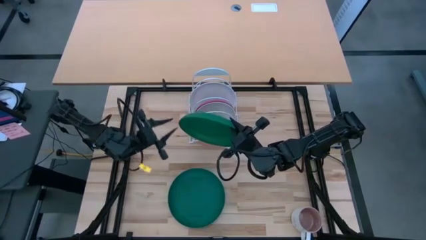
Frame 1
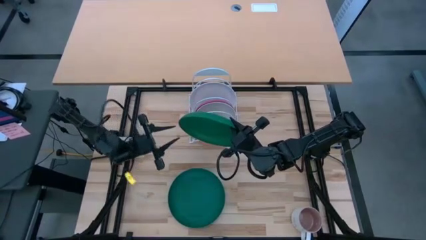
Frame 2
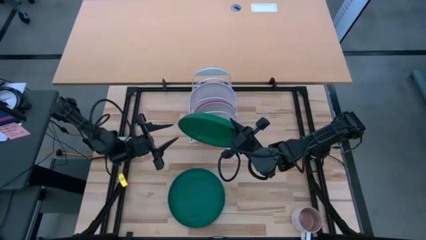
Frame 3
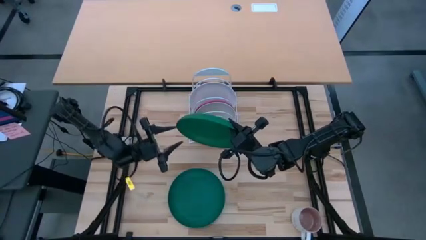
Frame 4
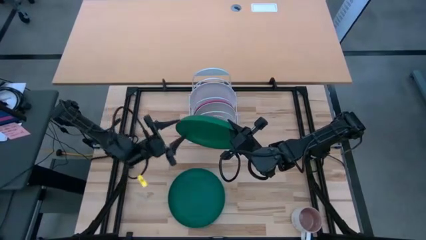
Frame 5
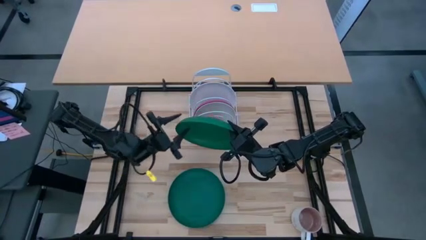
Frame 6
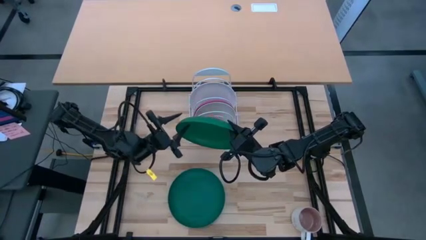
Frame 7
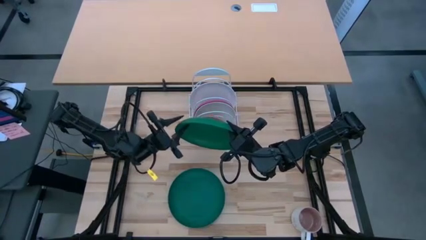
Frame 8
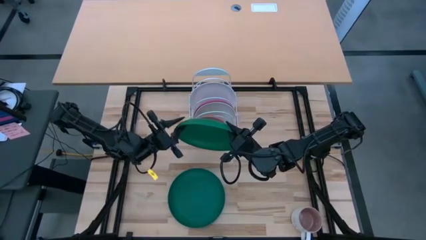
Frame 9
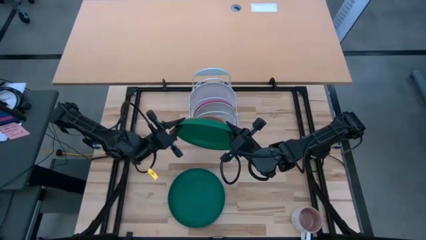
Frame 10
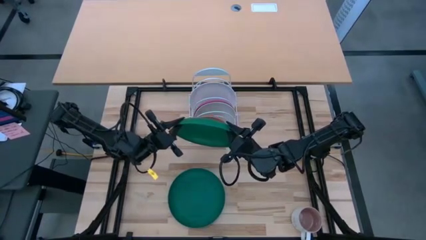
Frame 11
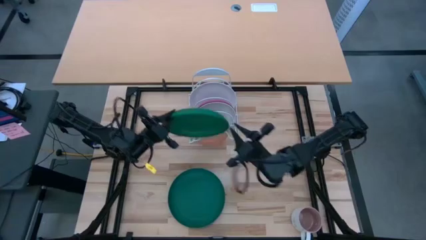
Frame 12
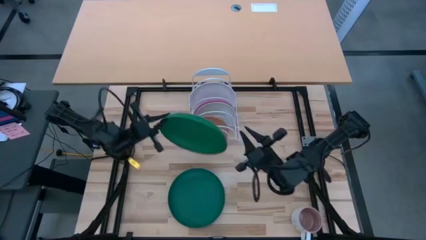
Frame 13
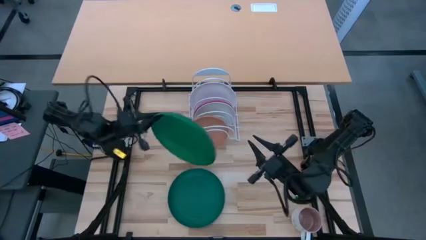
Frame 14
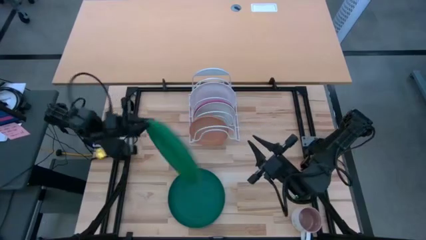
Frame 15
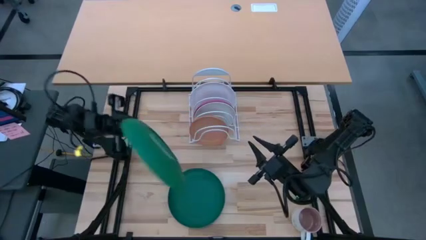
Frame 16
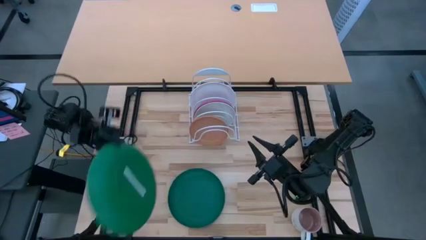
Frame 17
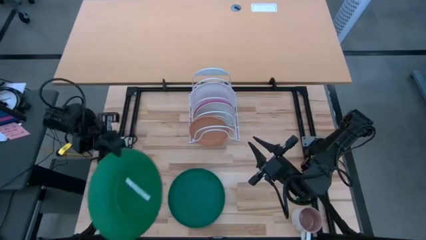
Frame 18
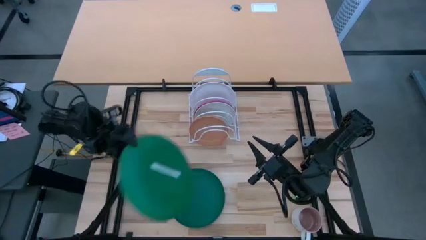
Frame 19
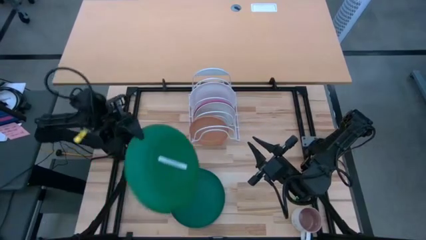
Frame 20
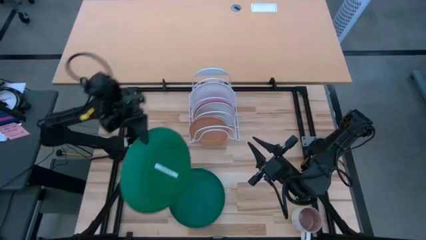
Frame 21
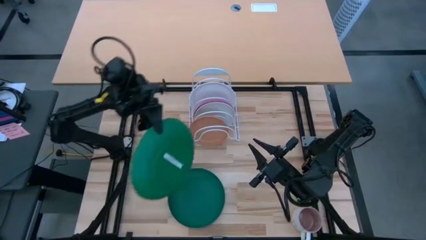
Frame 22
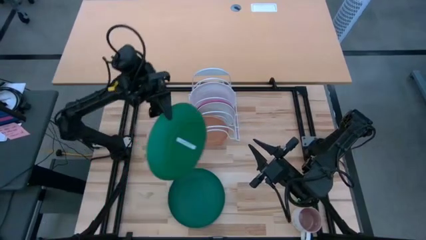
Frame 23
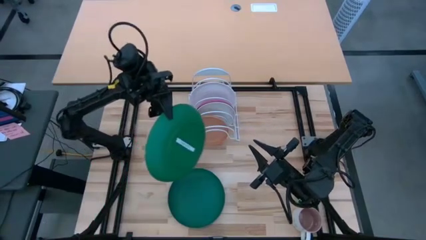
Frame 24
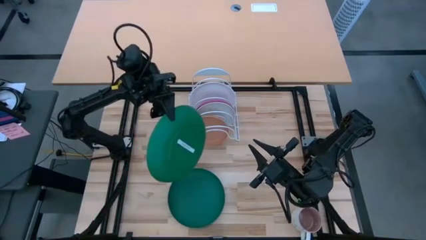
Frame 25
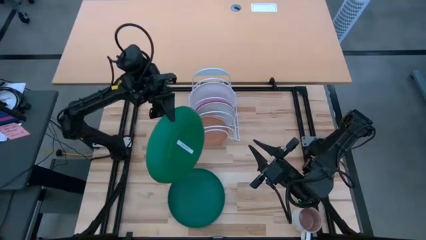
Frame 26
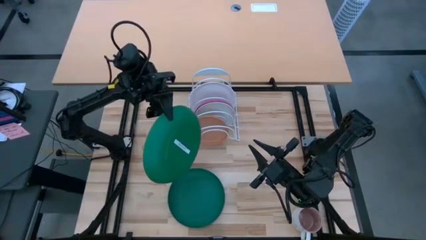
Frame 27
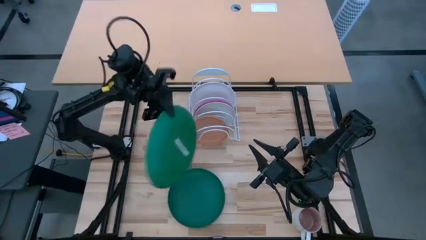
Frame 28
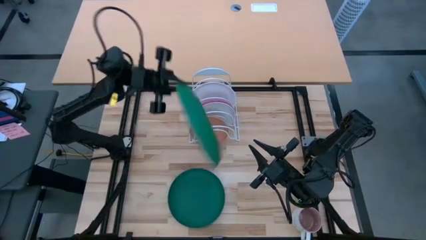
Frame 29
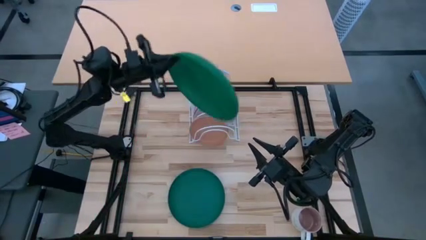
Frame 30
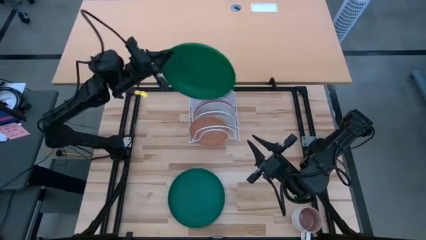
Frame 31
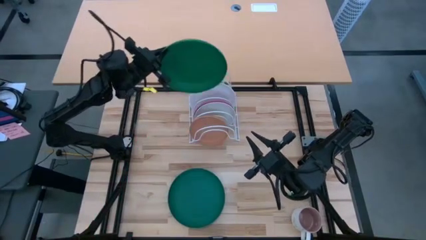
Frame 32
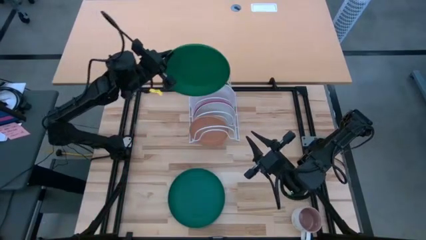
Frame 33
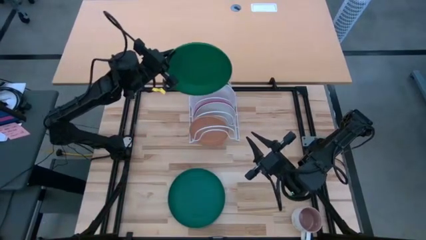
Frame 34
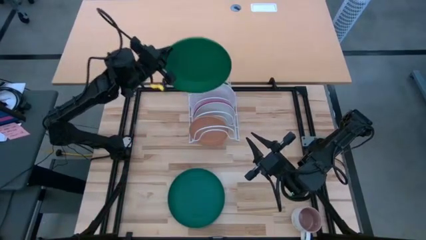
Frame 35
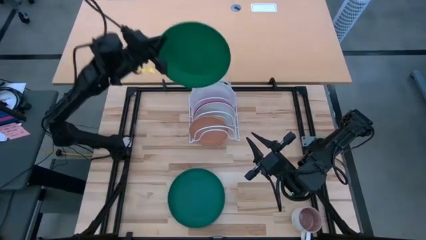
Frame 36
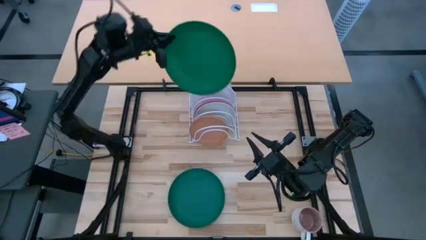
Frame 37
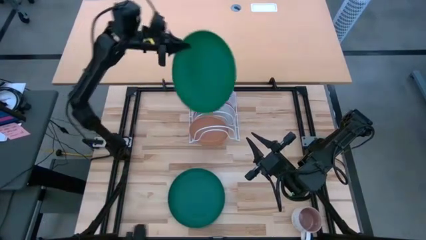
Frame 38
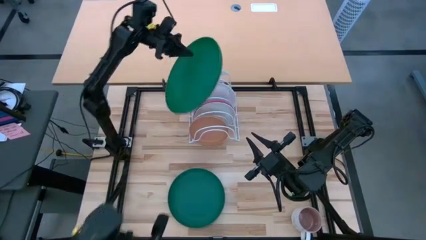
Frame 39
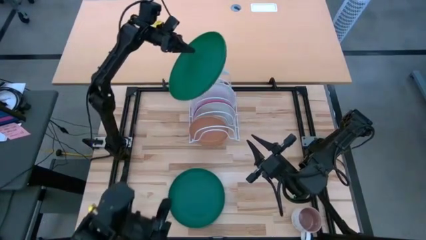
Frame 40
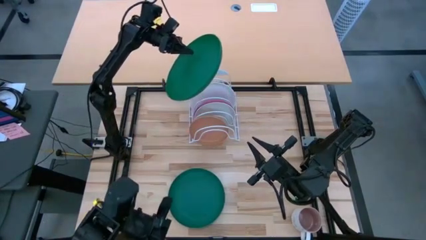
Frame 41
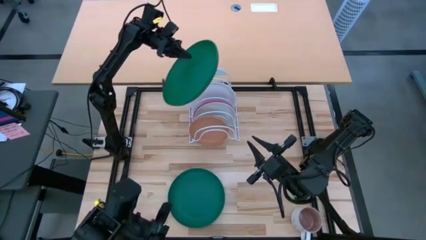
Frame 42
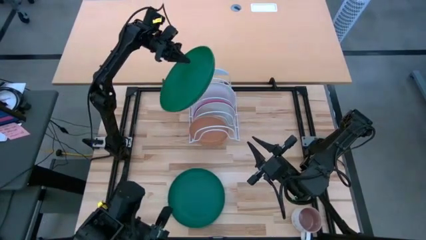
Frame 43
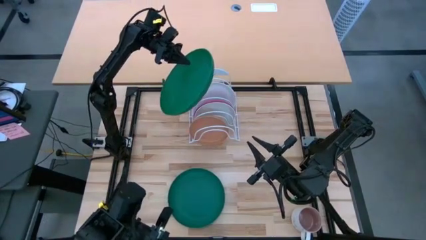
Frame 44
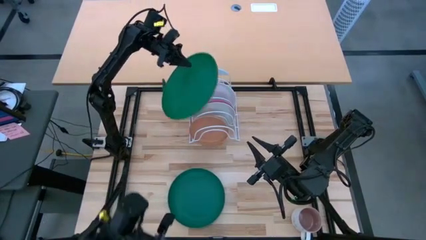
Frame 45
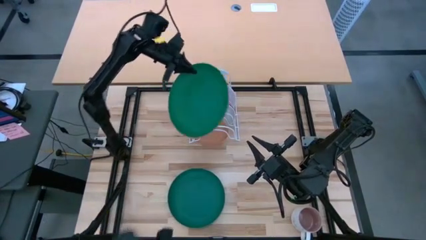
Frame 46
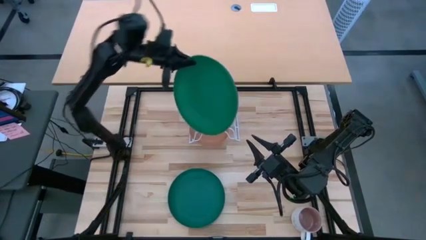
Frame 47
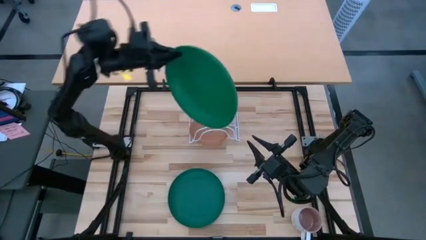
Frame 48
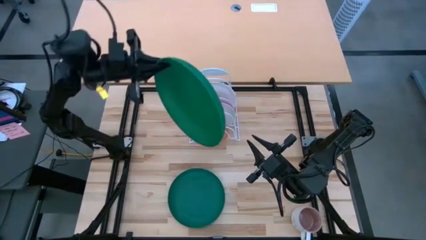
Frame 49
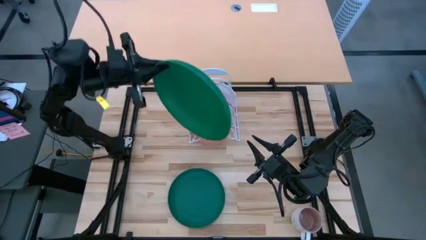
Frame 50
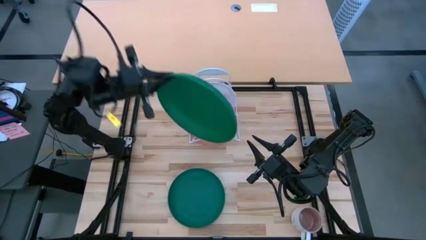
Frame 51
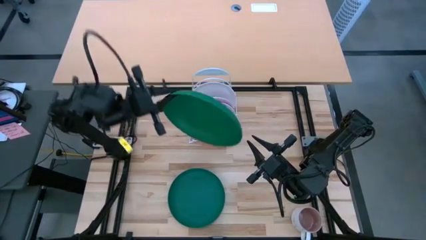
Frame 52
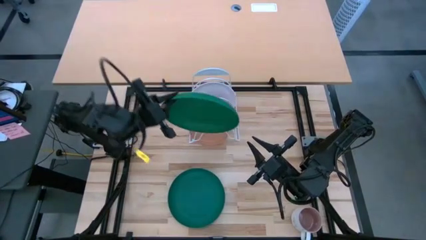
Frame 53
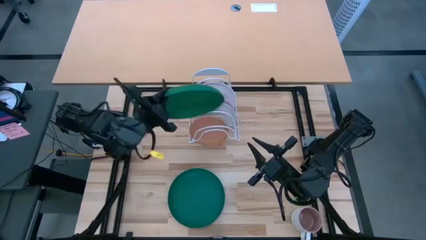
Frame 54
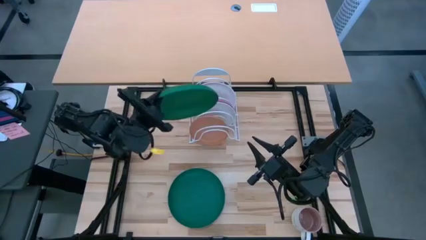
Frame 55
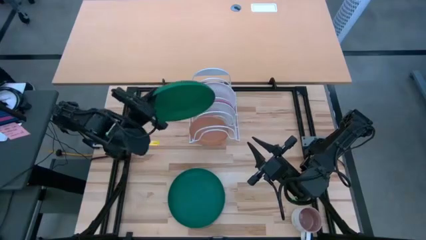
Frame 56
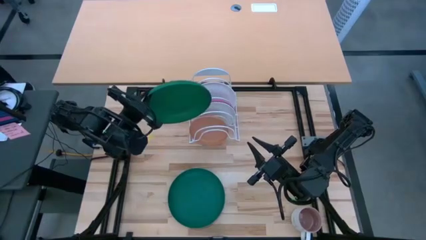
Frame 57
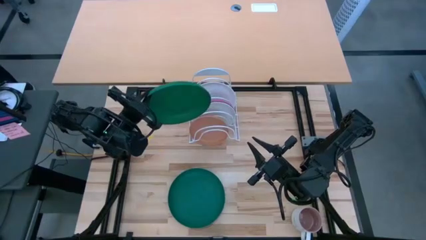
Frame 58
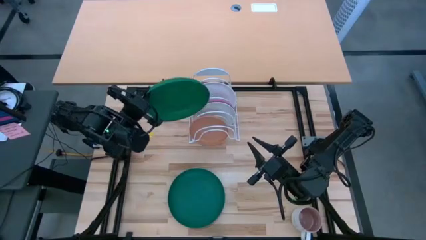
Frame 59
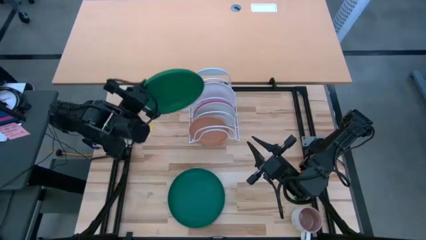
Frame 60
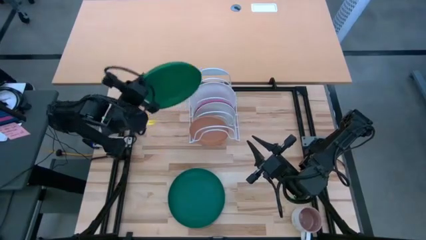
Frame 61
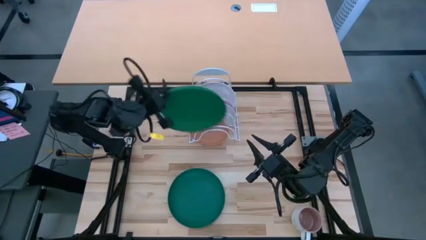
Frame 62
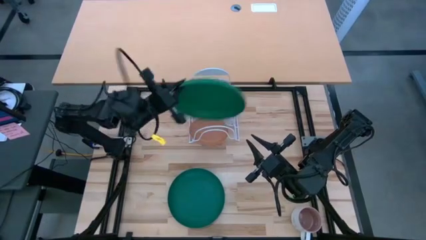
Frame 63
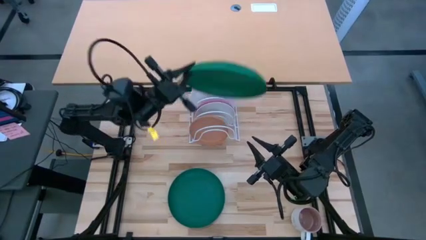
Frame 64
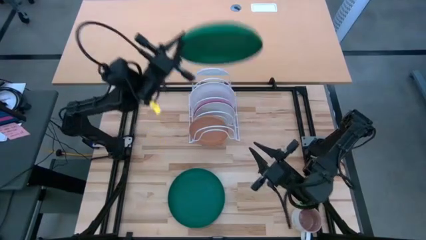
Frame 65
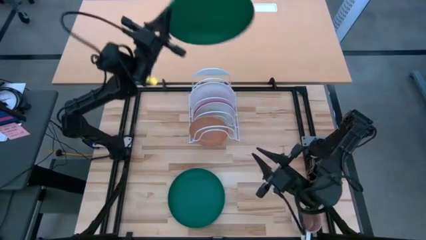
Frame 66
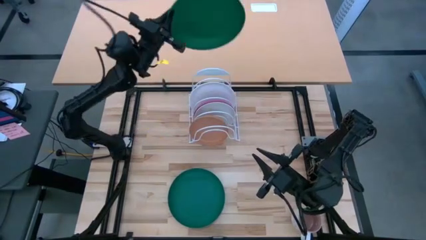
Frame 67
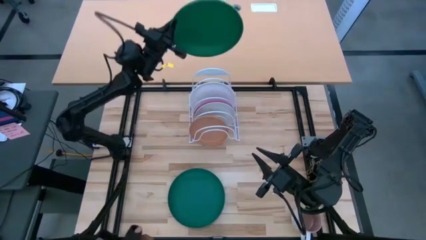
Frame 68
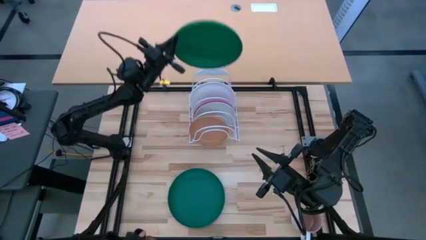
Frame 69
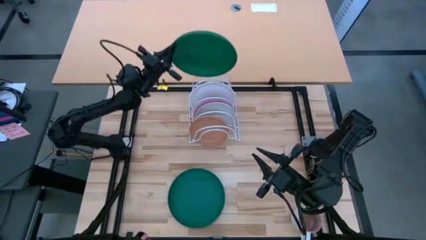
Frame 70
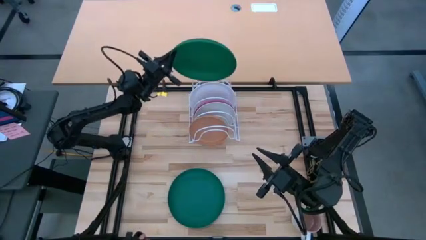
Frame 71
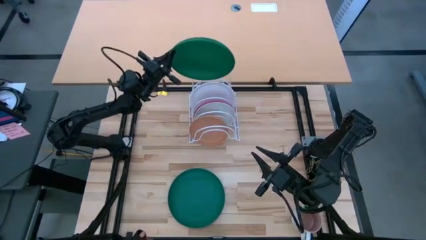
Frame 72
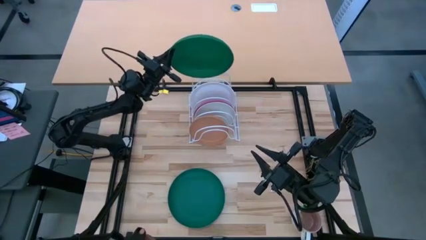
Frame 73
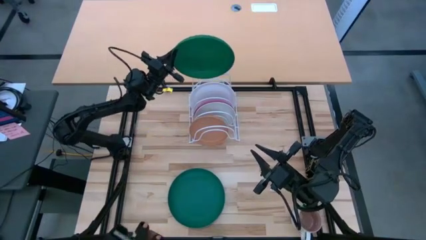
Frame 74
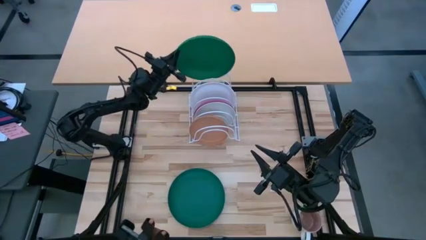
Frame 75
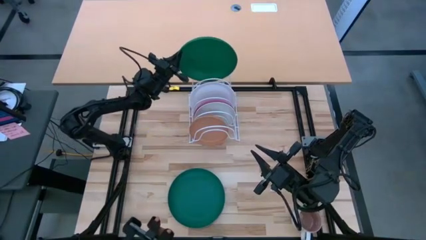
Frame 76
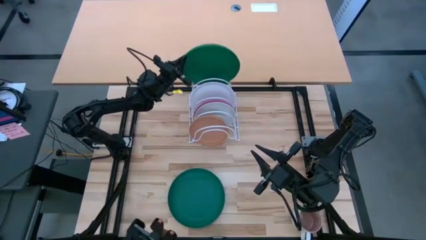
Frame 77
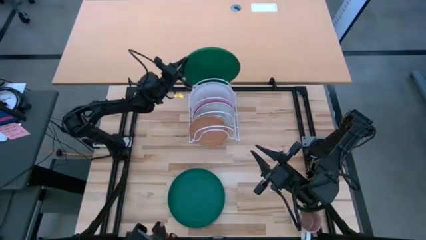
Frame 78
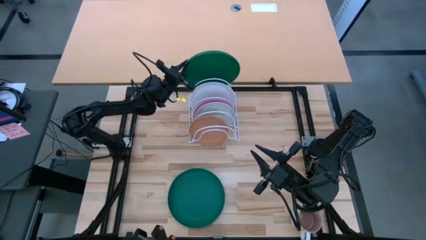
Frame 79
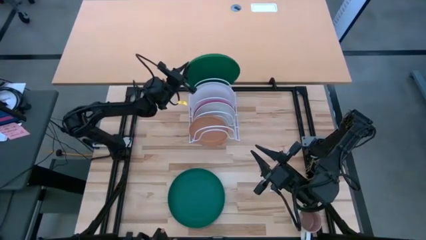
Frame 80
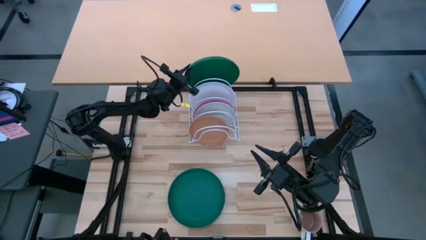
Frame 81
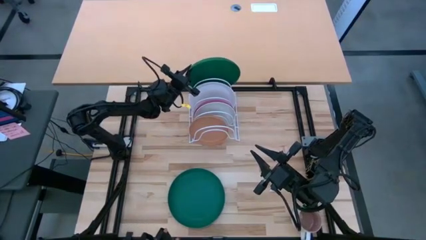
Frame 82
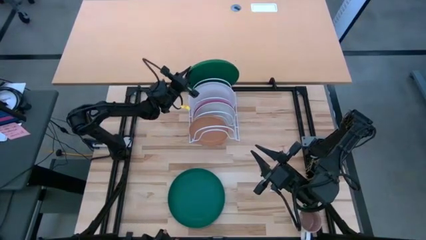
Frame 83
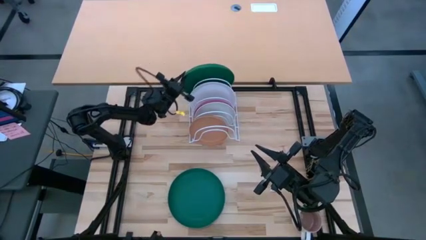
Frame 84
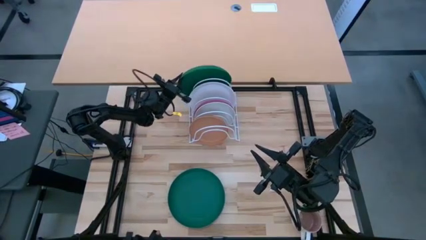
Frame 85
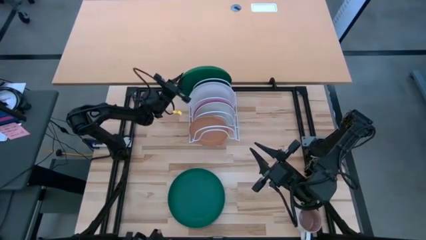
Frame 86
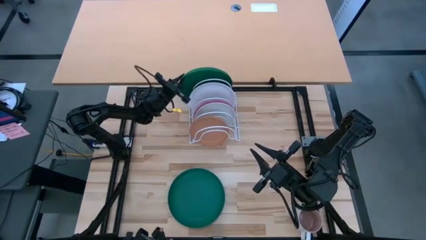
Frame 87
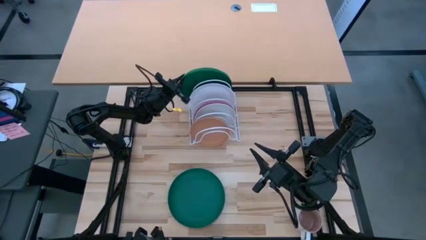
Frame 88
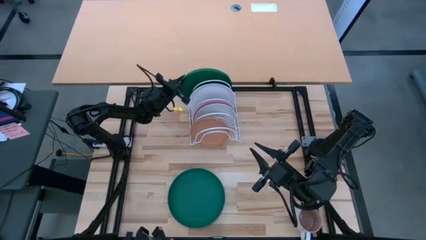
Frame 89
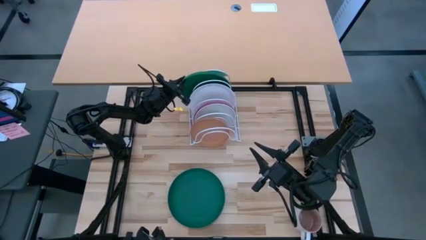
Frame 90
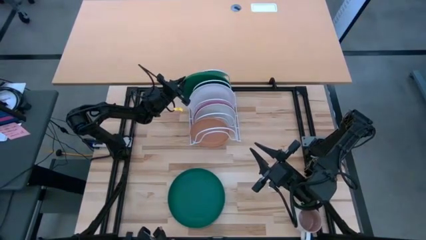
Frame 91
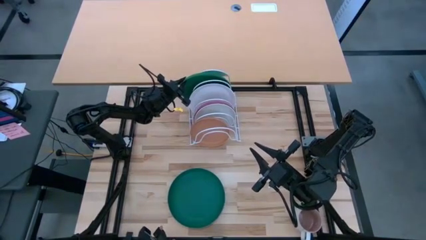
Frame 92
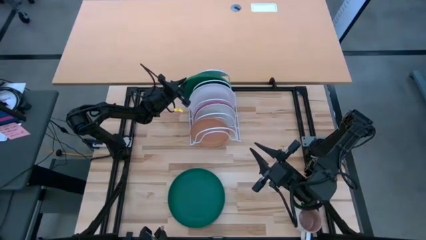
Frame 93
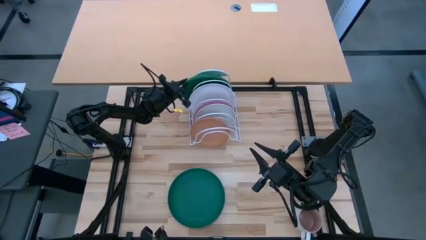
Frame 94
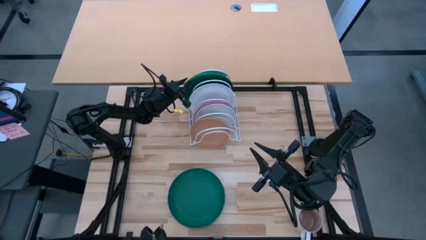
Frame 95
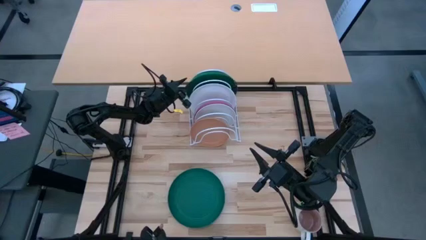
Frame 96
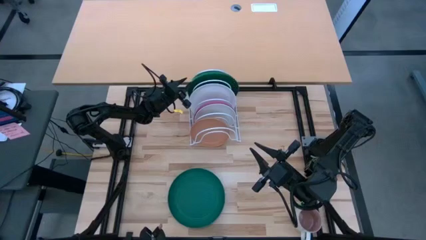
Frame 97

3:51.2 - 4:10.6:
Task: Sort dishes
Put the green plate on the dish rack
